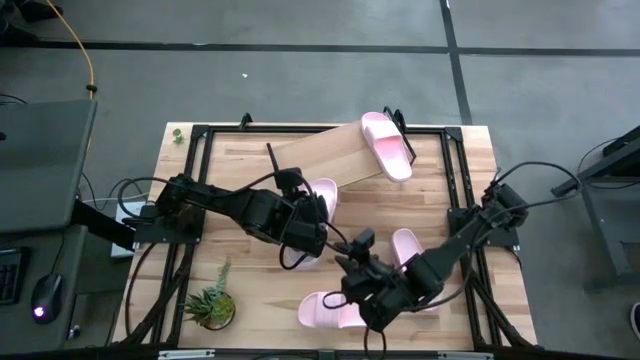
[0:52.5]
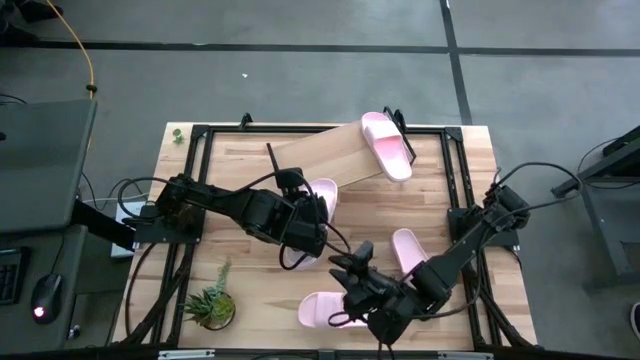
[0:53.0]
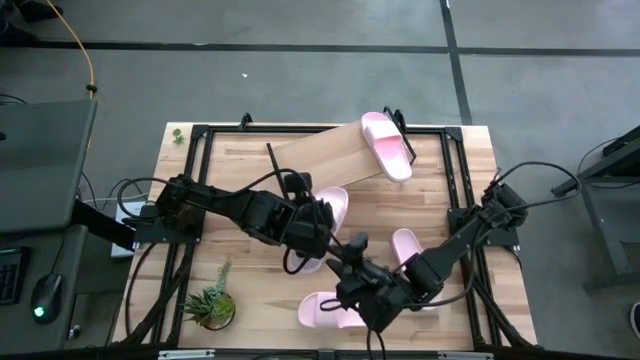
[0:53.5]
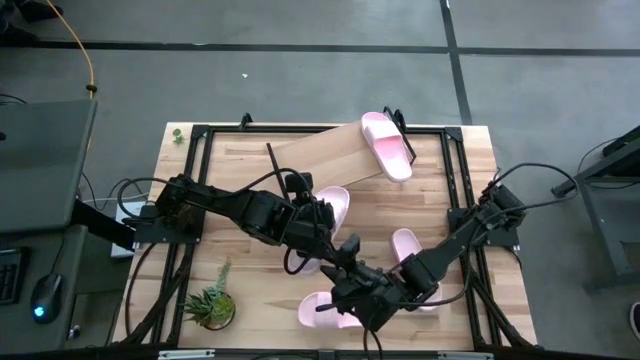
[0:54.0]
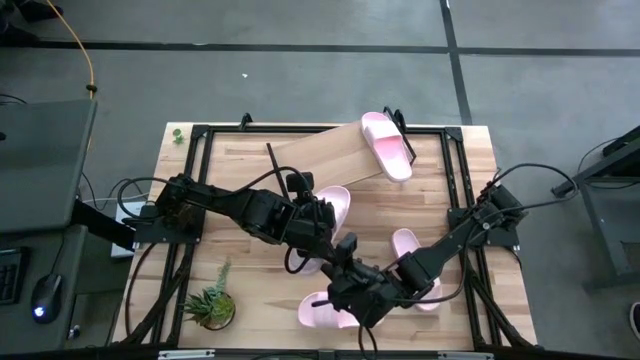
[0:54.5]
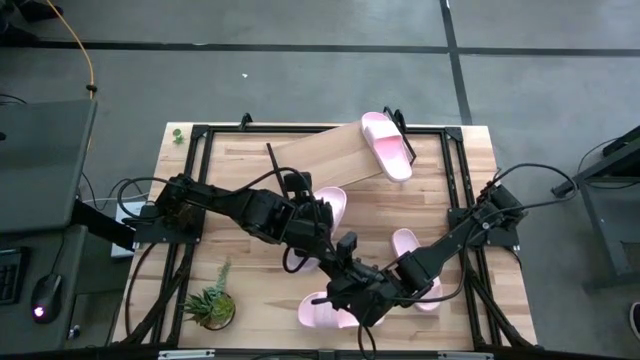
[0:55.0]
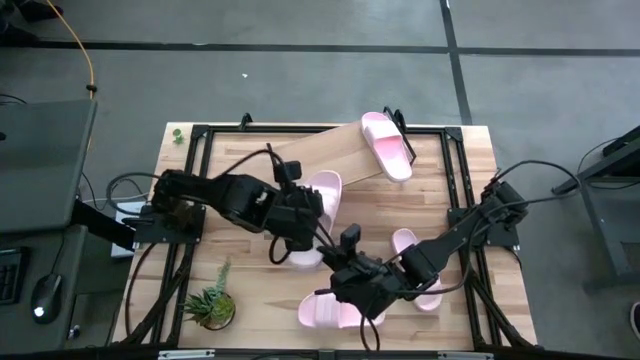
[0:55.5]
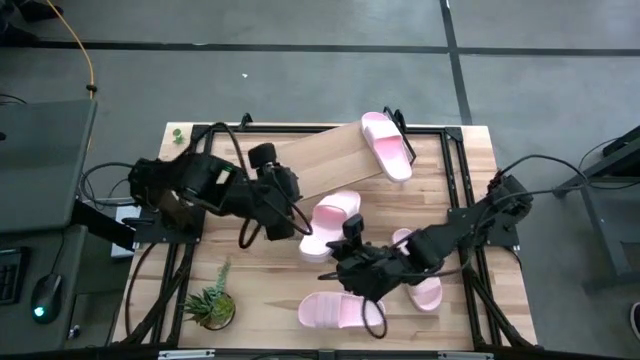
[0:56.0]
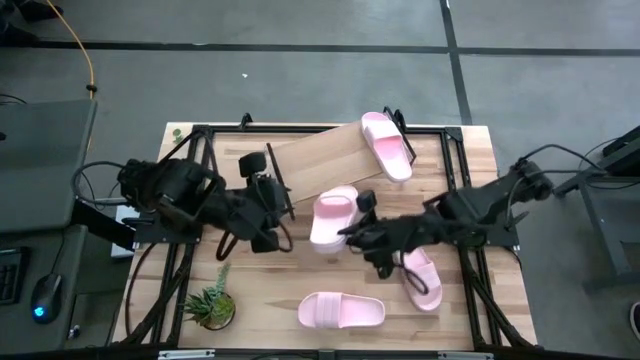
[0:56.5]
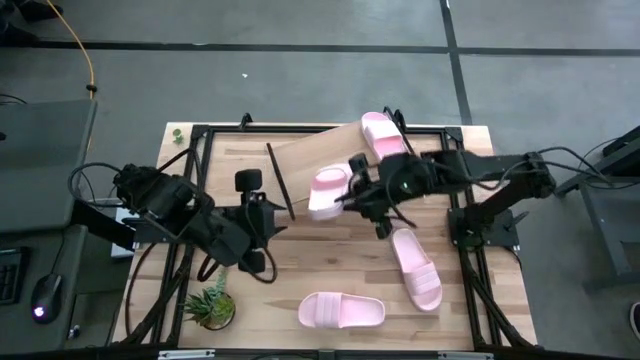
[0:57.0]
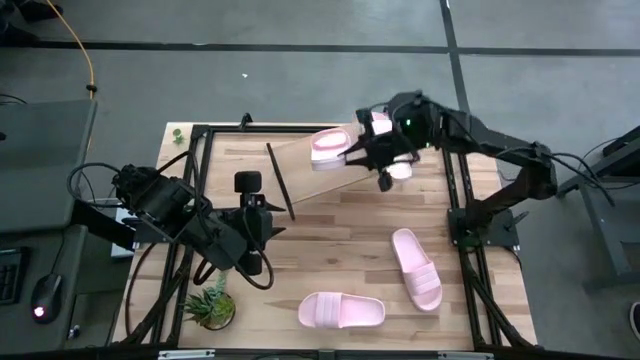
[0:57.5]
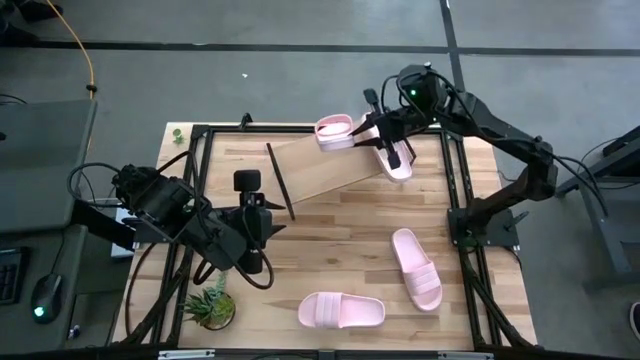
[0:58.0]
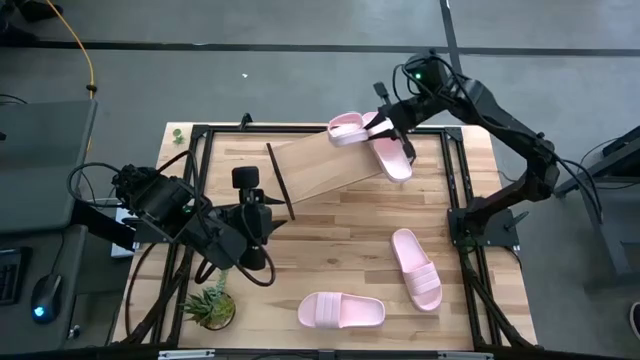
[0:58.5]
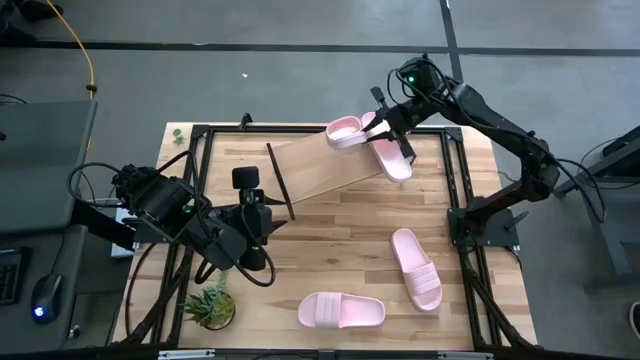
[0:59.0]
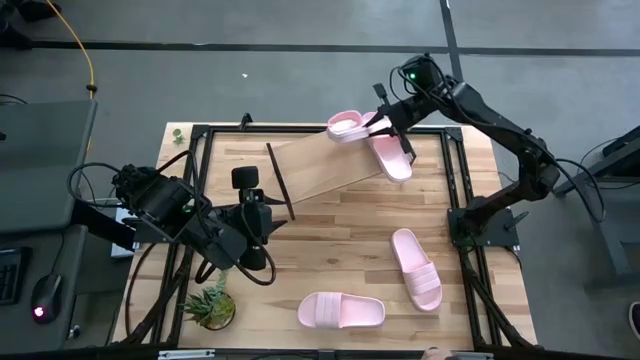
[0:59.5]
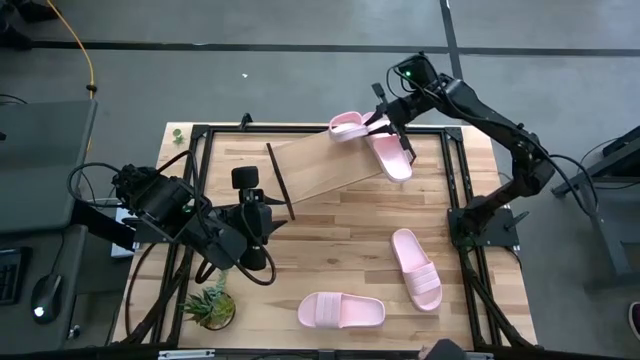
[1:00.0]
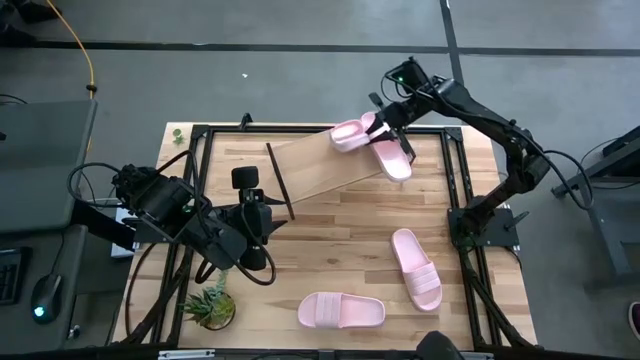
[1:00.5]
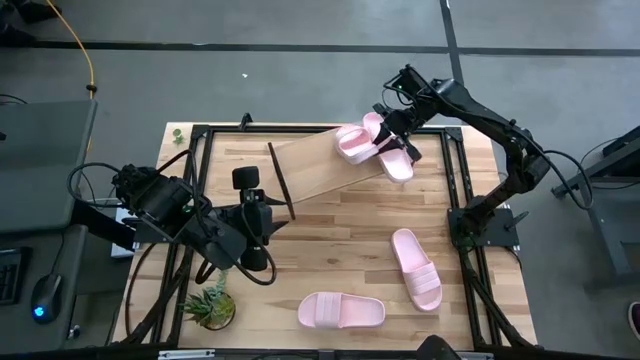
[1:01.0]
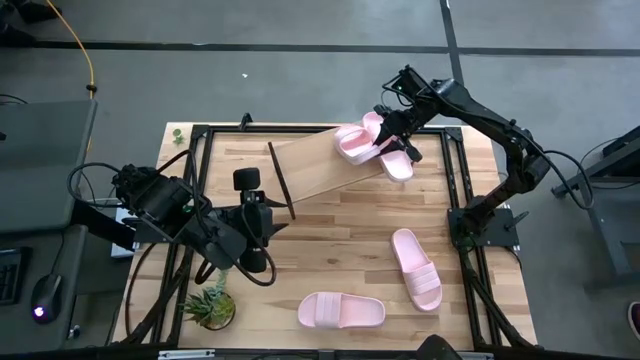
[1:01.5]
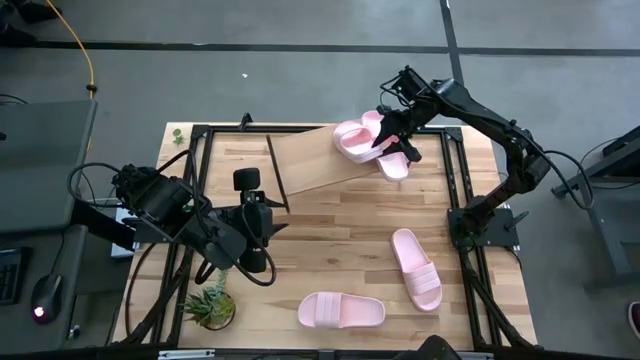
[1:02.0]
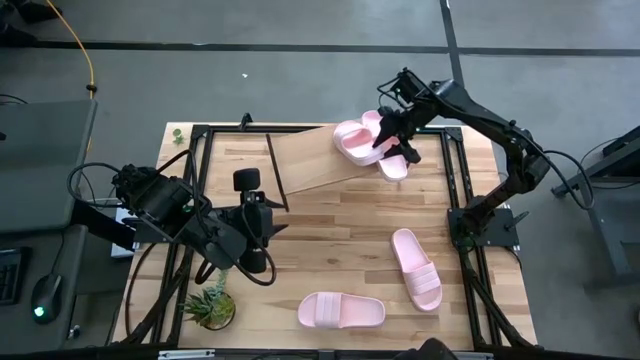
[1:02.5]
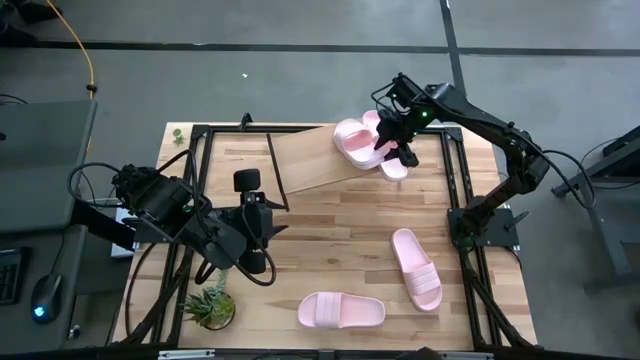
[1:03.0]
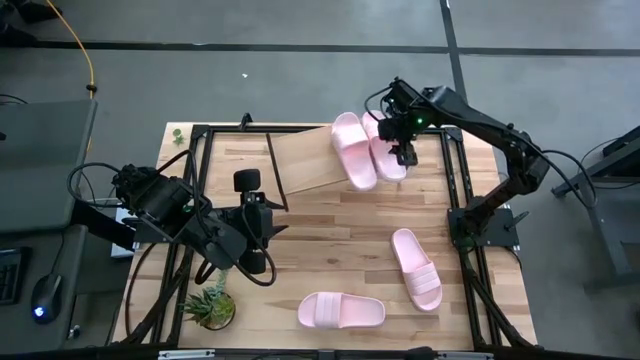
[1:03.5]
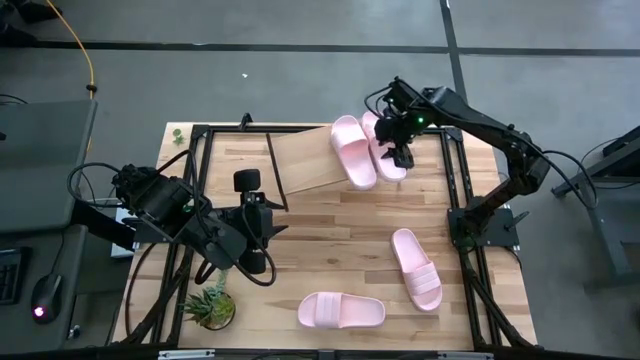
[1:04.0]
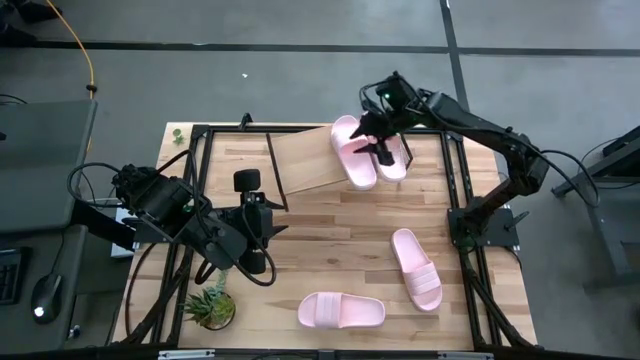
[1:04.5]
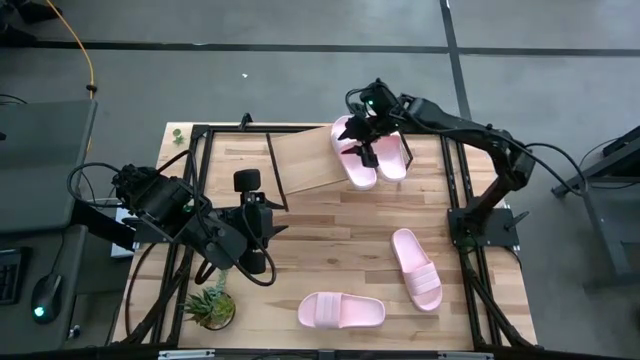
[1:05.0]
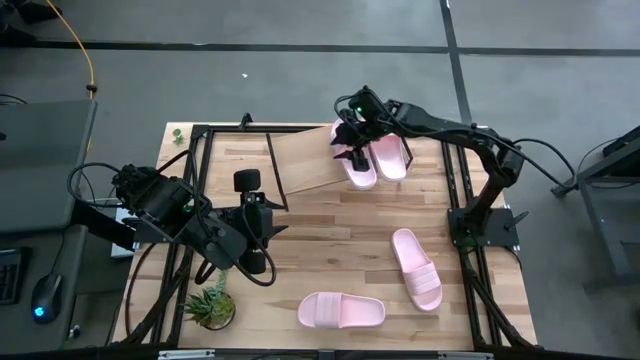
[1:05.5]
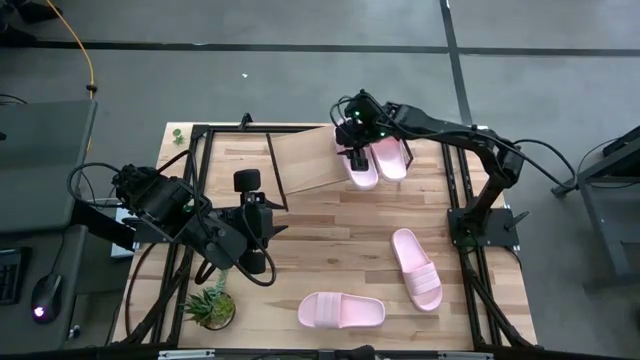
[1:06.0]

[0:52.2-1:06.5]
Task: Pick and place slides into the shelf
Put the pink slide on the shelf

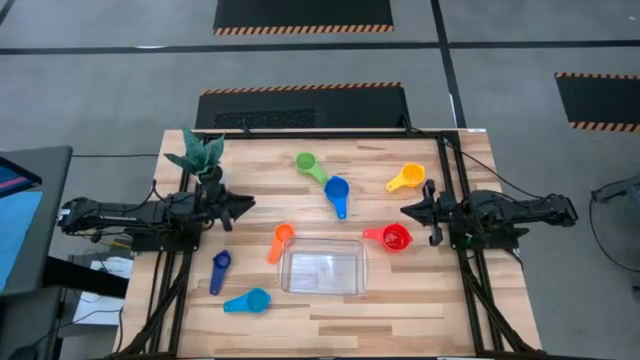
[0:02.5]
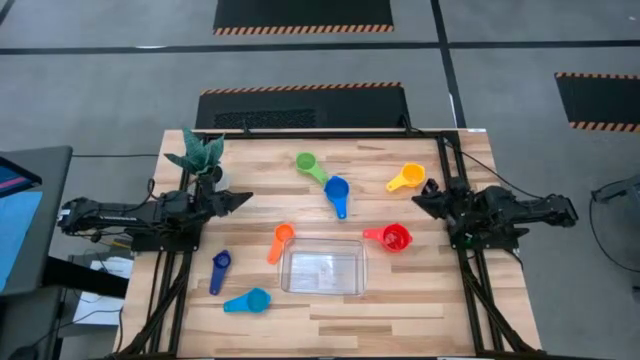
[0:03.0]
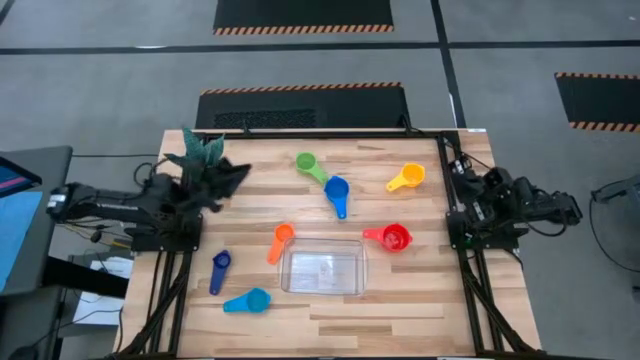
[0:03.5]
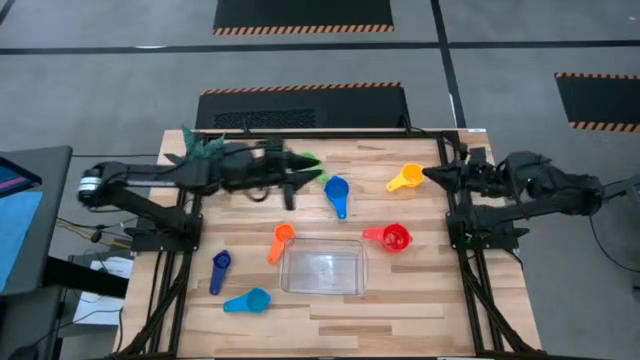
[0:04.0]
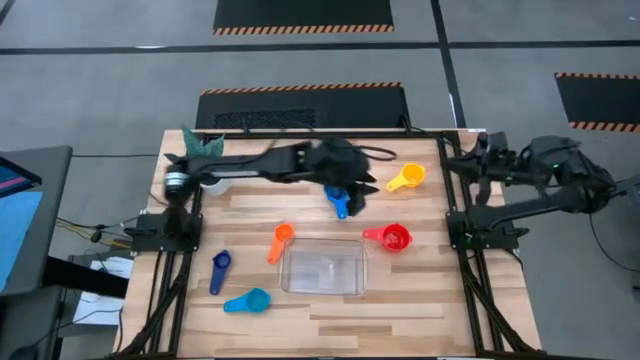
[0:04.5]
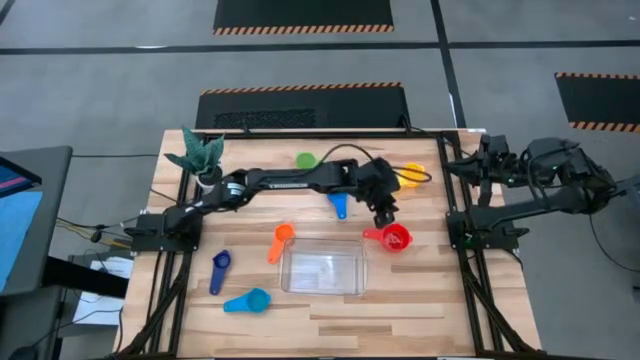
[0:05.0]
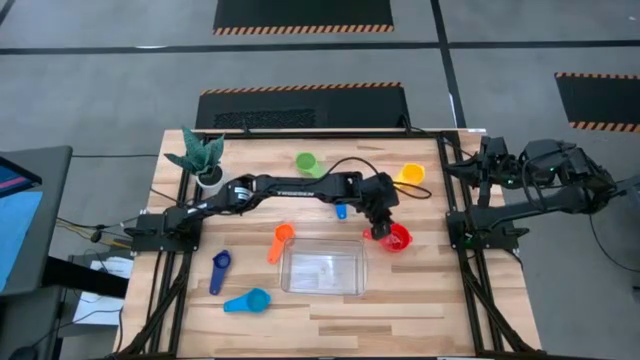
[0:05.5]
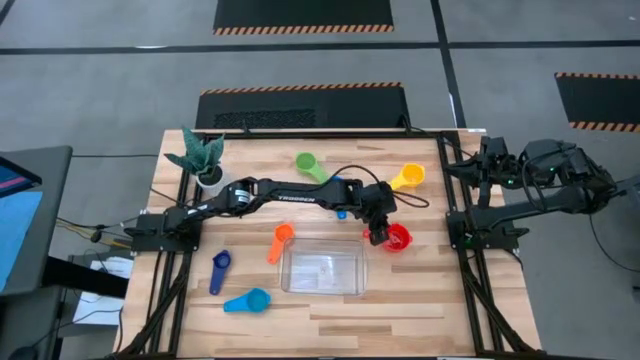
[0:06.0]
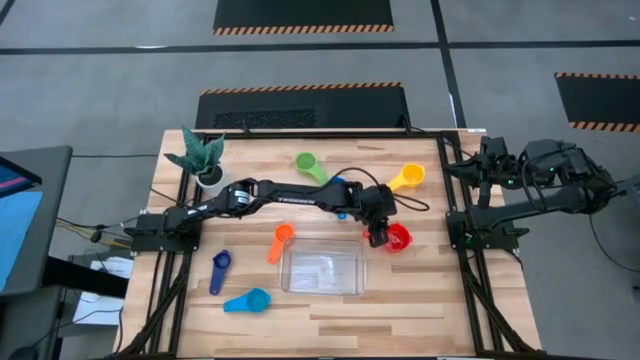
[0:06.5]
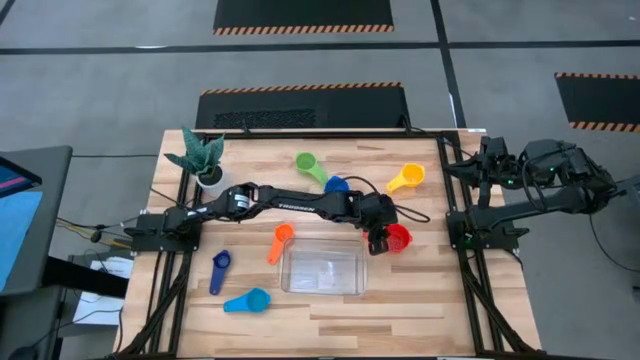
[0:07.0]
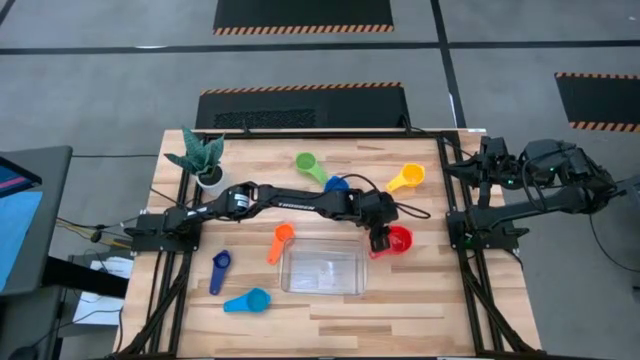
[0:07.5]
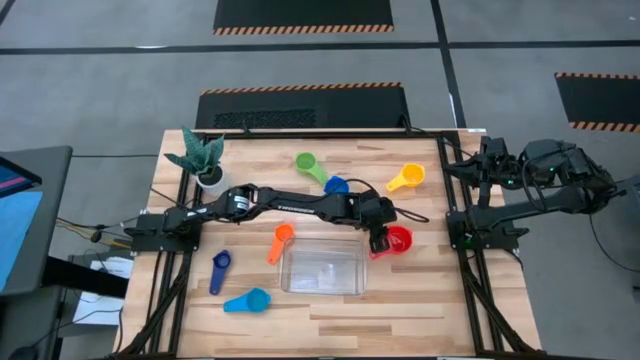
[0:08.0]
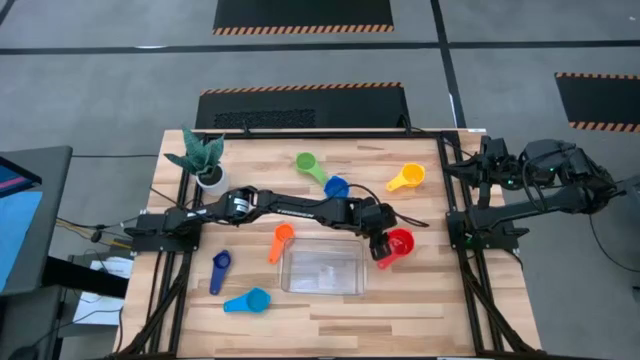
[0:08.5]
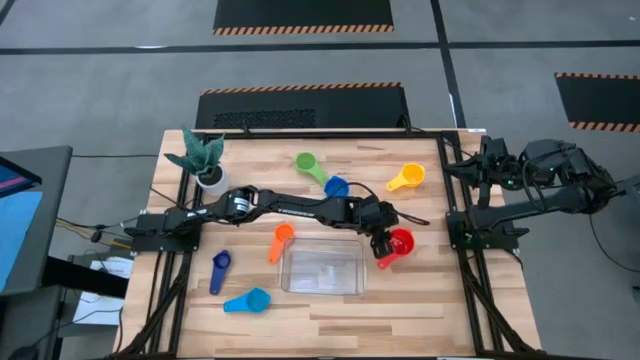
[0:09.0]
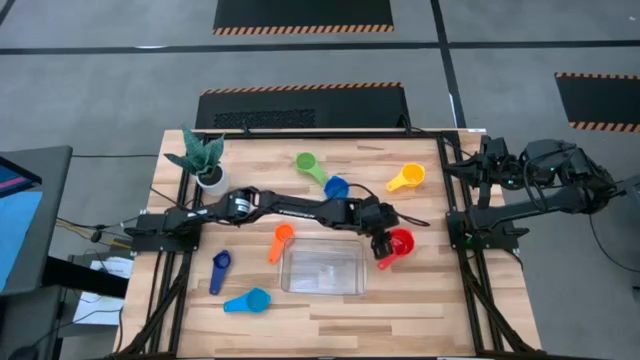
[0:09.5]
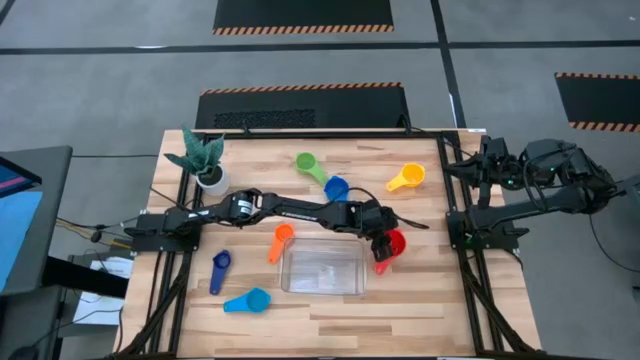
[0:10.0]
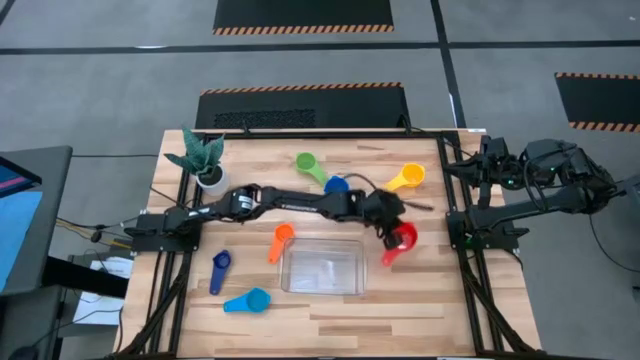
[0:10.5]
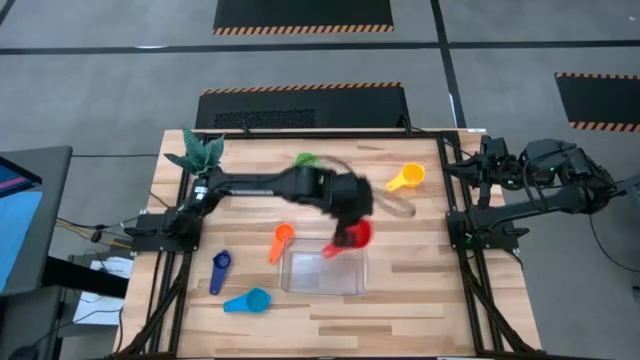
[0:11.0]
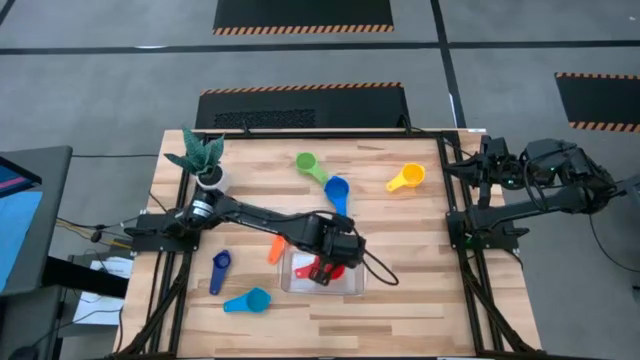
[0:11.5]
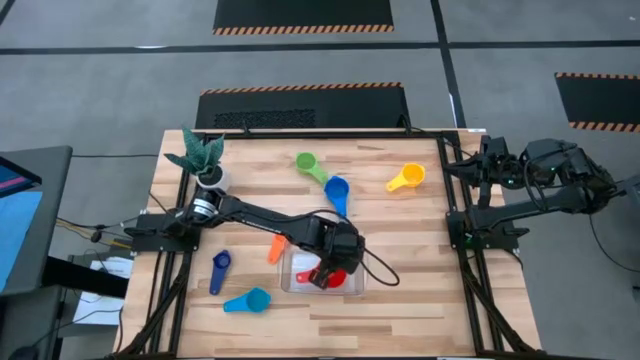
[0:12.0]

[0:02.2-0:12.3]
Task: Nest measuring cups in basket
Put the red measuring cup in the transparent bin
